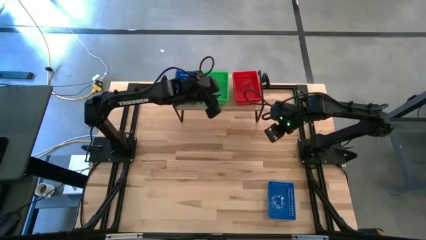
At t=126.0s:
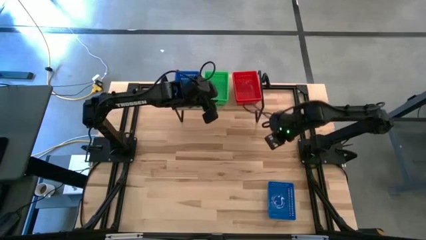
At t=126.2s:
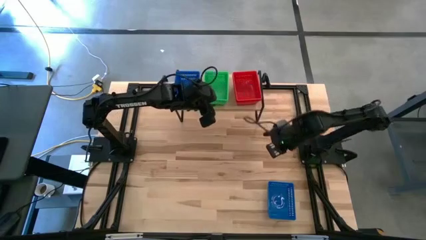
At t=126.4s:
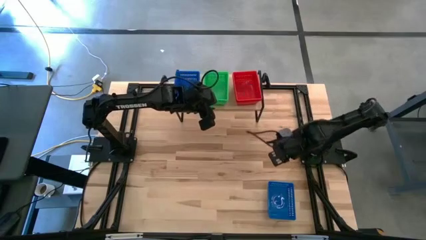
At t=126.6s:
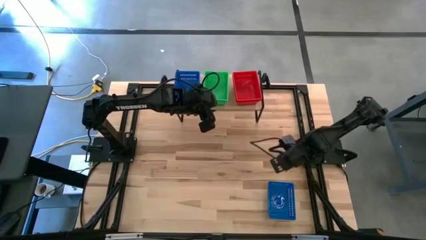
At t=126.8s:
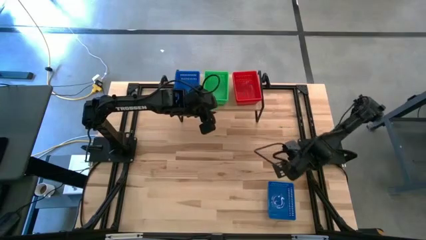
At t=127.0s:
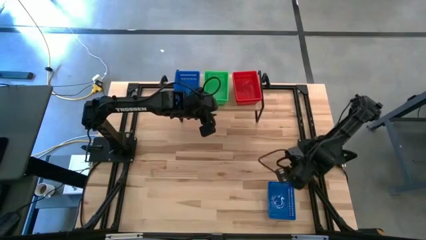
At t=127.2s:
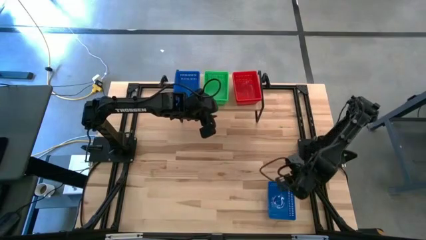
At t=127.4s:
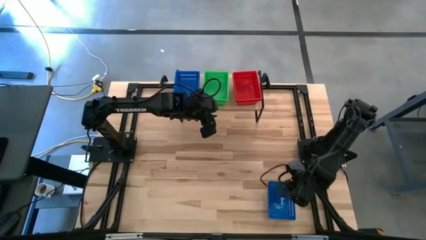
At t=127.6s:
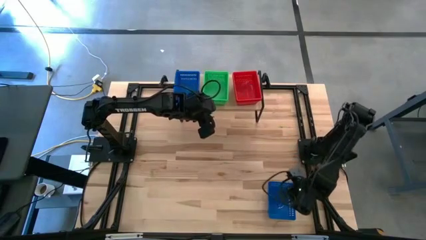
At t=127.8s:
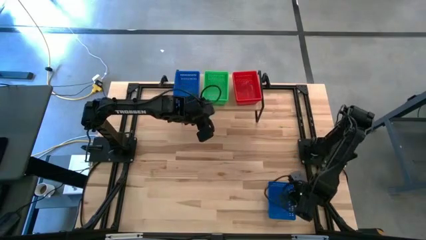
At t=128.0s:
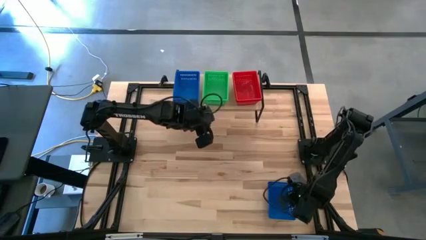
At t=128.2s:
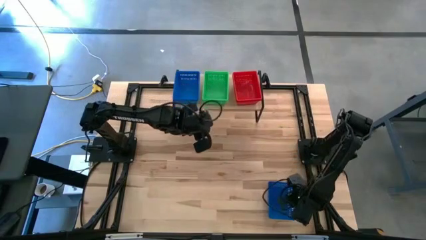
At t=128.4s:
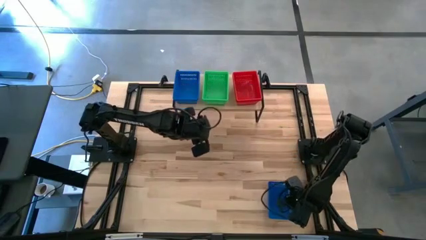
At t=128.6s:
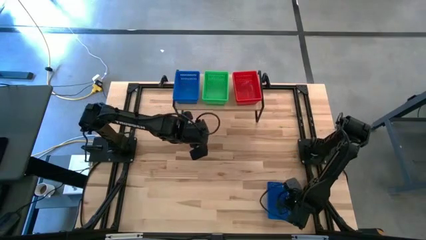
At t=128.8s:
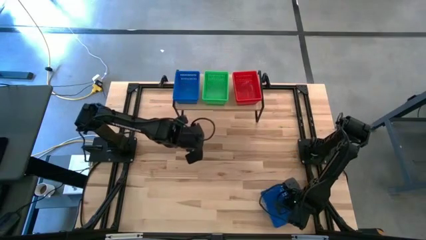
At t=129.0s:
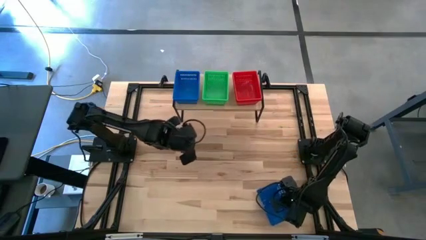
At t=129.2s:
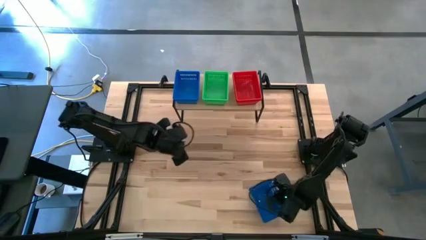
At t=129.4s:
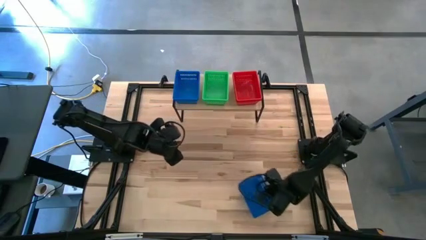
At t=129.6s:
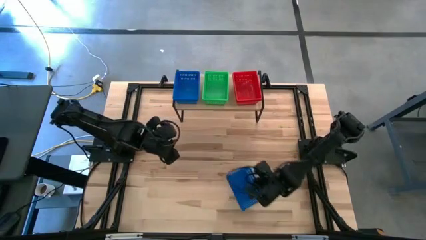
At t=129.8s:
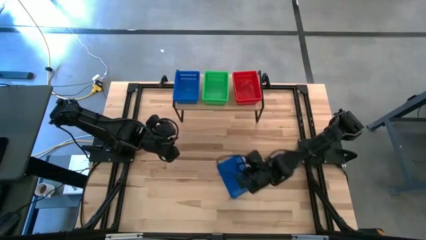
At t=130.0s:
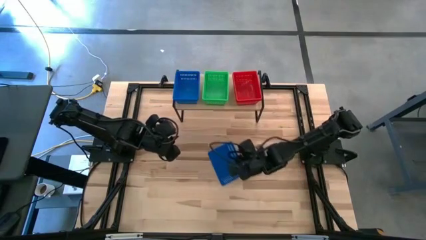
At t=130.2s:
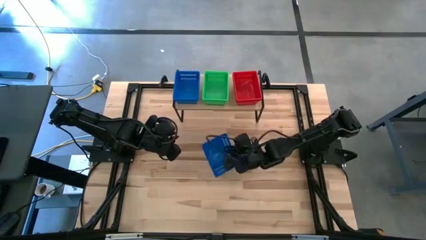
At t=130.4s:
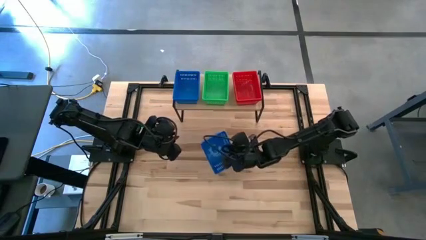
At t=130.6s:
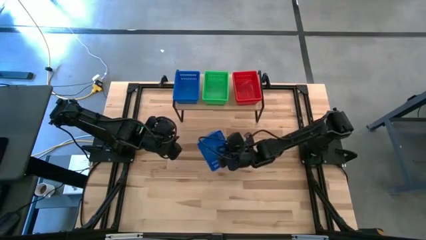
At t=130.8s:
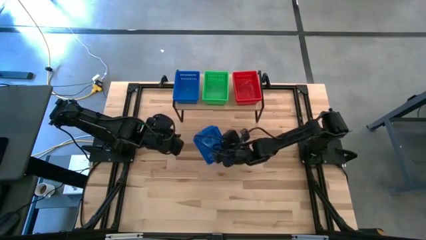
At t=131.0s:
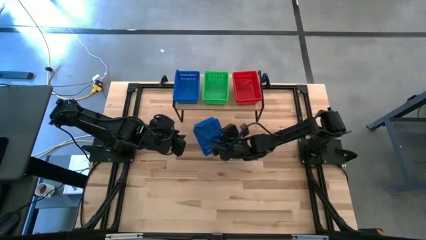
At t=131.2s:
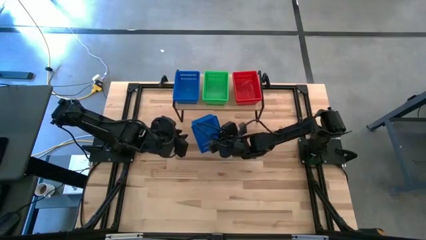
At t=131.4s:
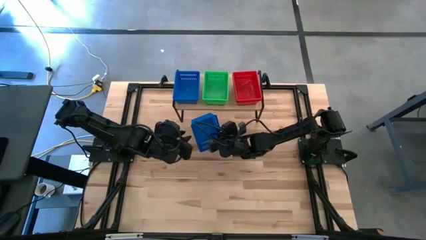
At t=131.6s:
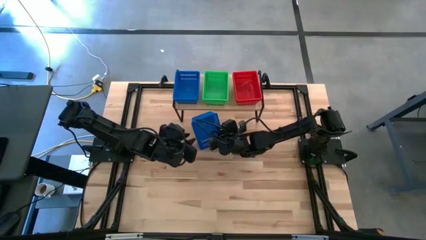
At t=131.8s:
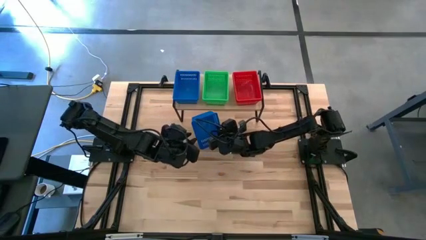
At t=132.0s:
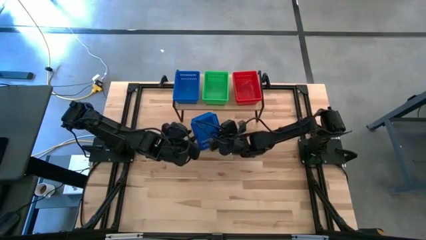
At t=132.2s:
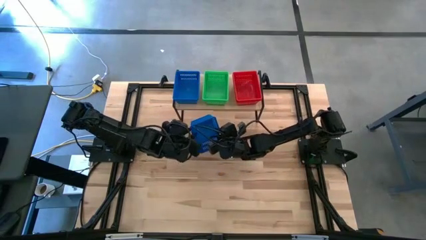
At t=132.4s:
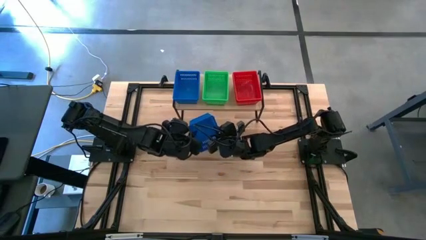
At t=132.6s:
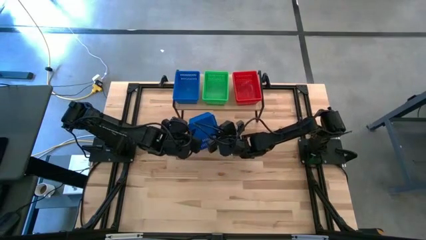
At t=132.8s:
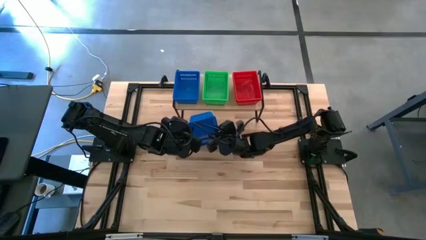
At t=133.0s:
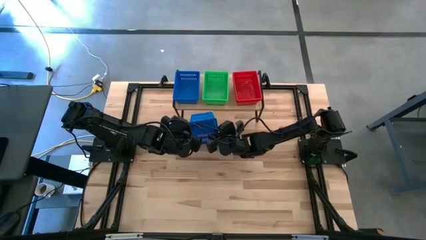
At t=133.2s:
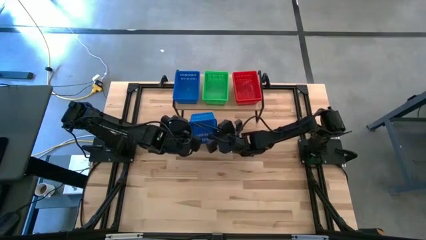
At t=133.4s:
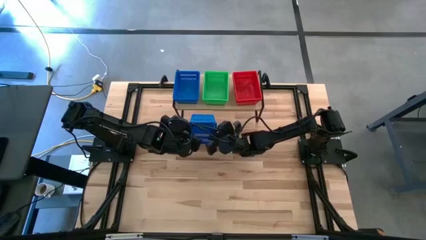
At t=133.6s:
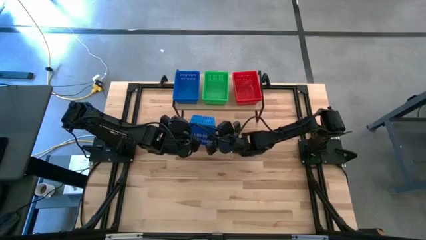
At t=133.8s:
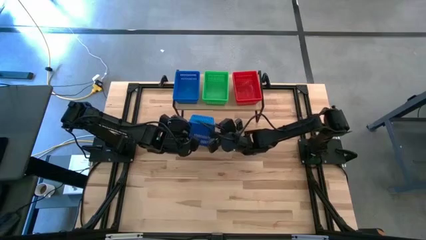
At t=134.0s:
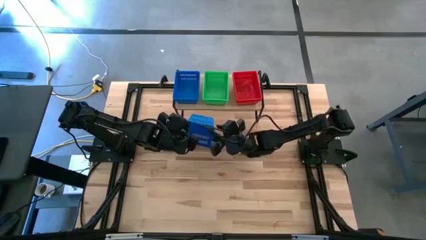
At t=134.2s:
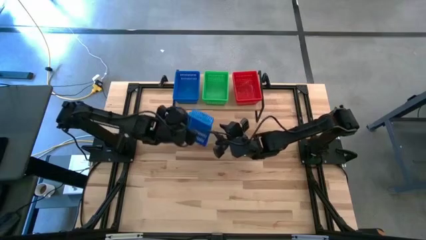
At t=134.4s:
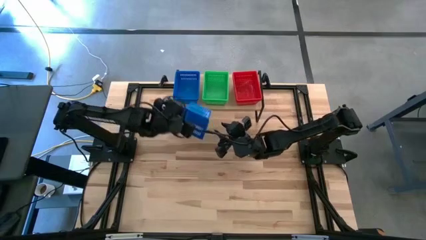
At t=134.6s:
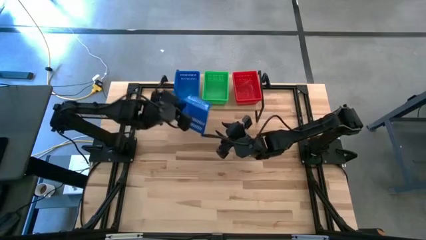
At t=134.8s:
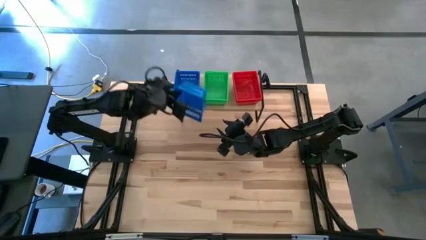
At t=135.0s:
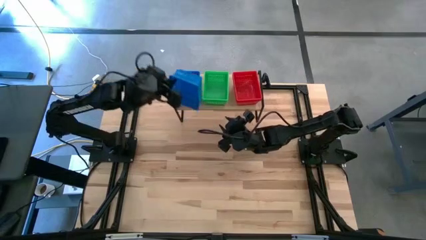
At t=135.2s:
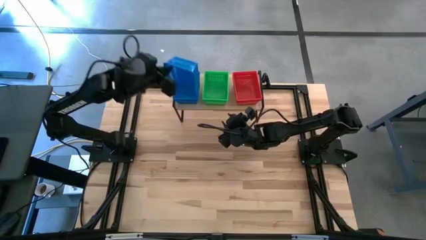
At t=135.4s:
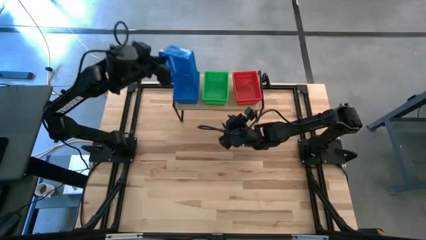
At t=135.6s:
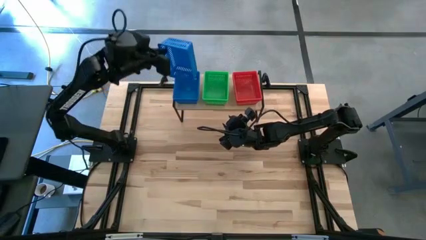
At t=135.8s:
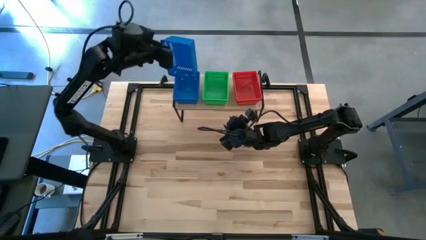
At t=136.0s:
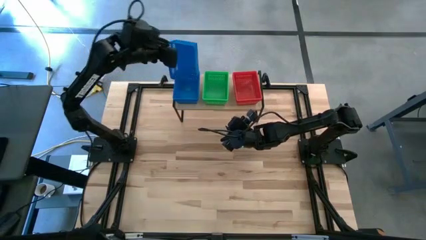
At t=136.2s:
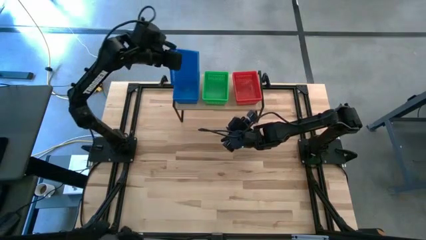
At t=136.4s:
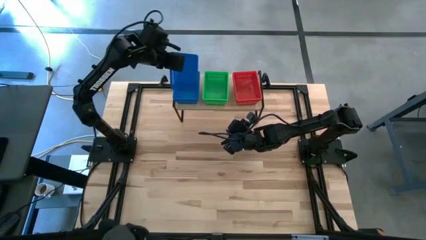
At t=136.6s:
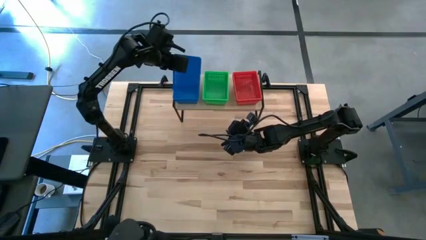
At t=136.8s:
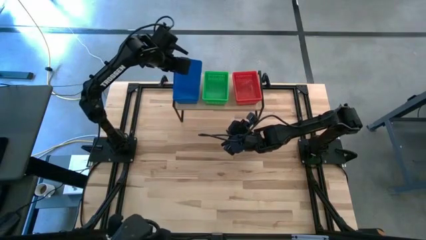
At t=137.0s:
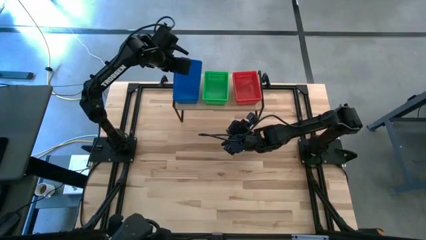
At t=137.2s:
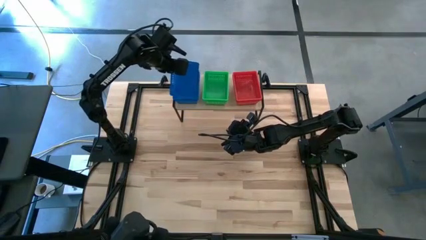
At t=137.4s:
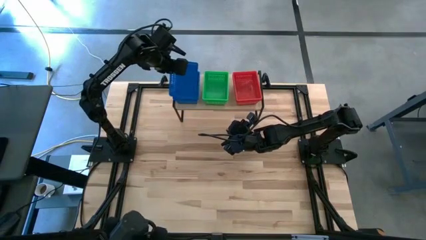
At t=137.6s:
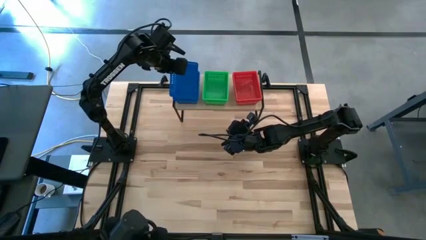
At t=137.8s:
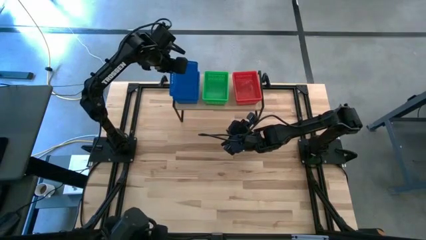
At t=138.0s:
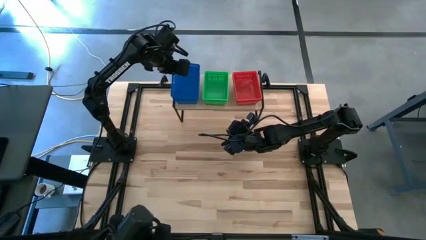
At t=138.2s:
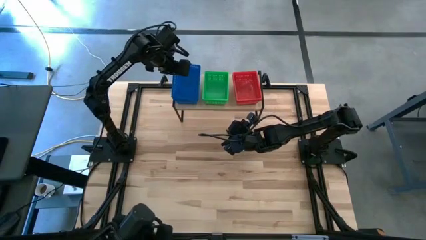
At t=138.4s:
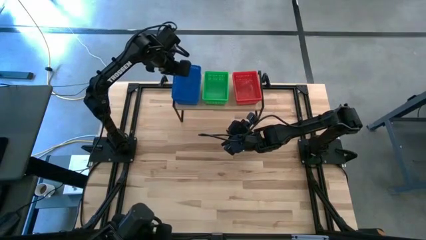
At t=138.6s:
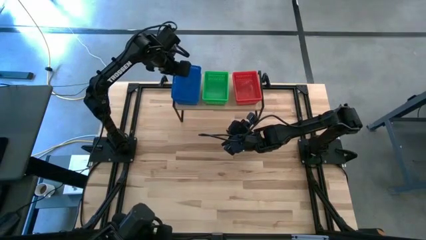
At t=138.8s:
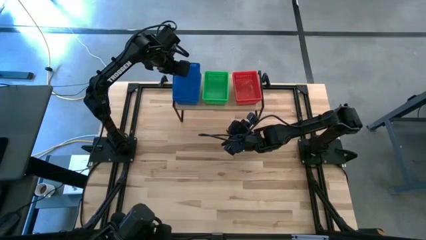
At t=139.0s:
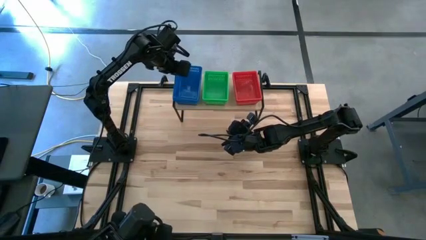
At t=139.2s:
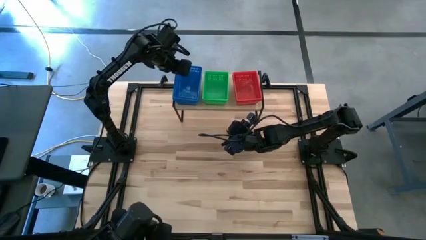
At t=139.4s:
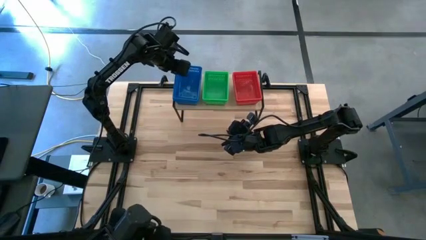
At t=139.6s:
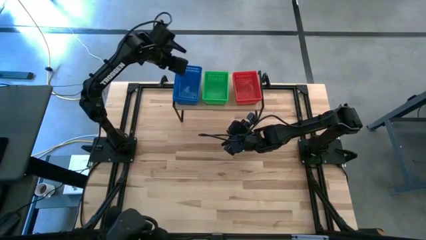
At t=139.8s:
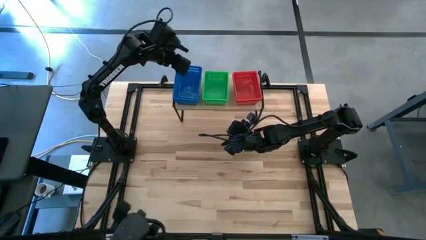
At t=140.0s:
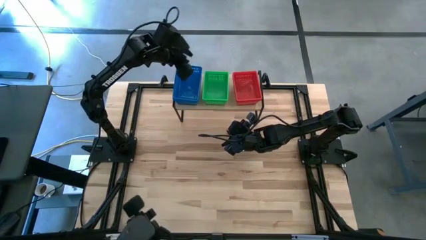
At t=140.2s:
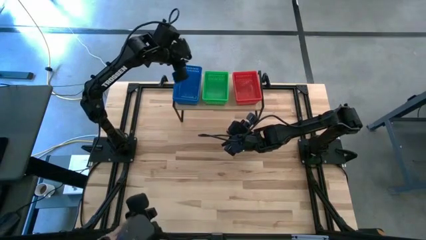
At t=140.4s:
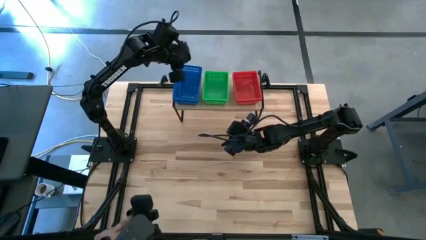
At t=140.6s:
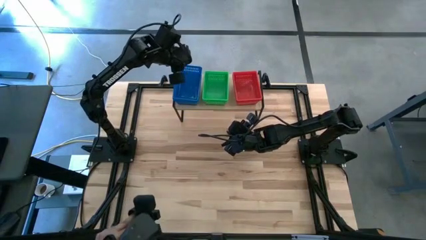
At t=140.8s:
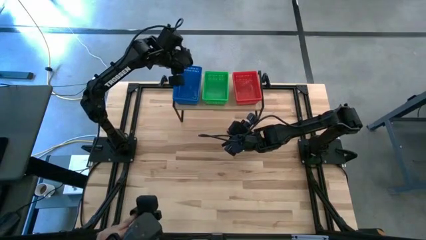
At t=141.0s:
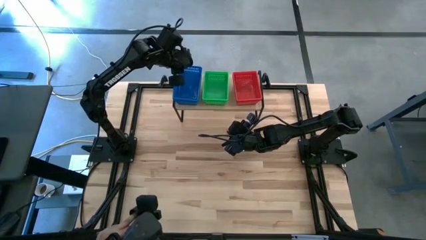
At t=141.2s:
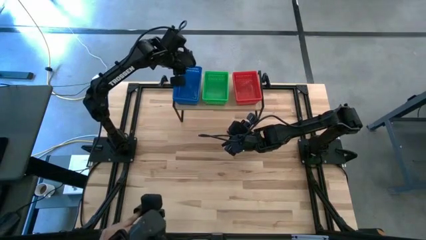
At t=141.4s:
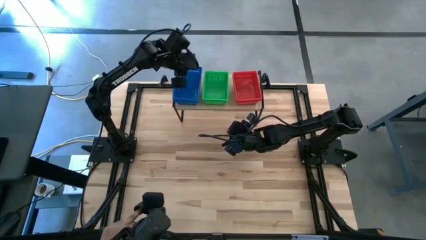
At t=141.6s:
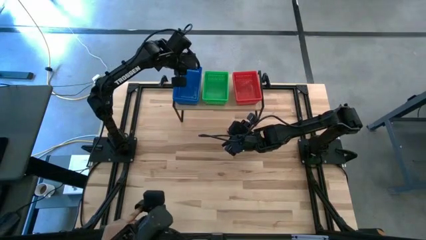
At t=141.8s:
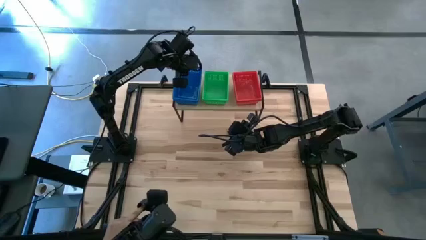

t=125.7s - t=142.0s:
Task: Stack baskets on shelf by color
Stack the blue bin on top of the blue bin on the shelf
